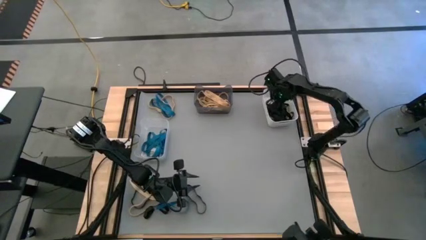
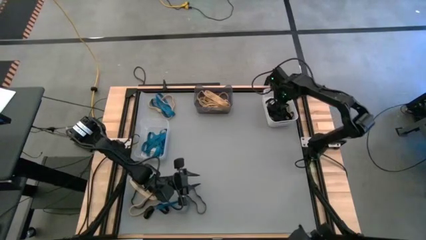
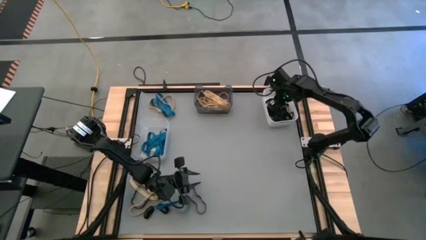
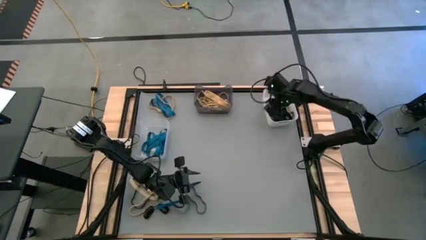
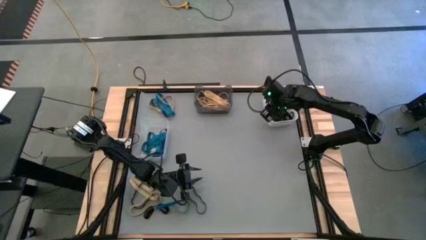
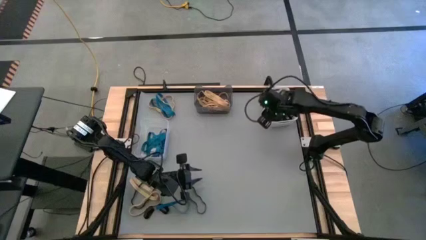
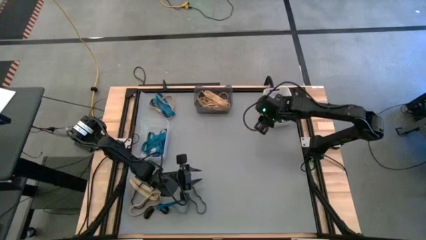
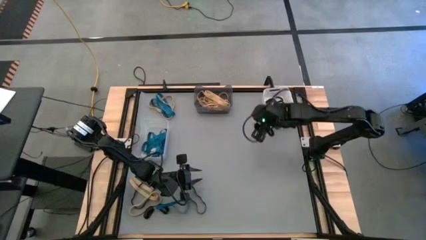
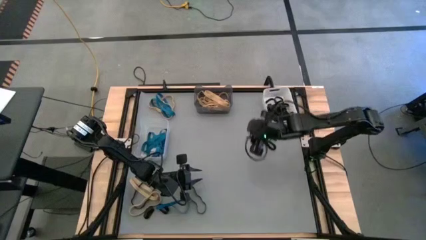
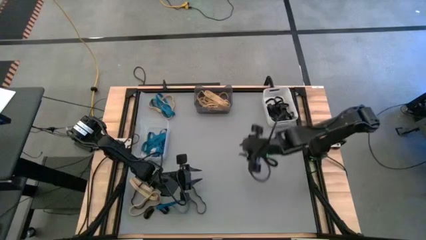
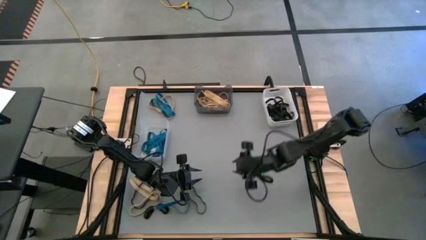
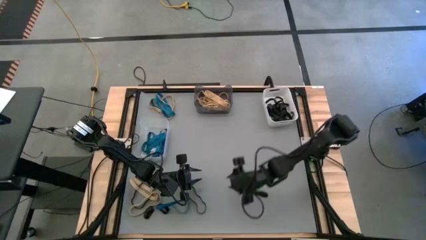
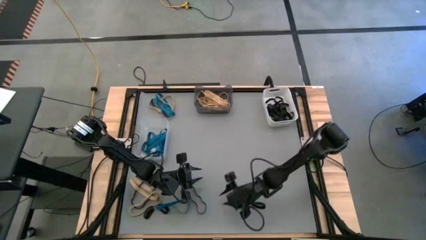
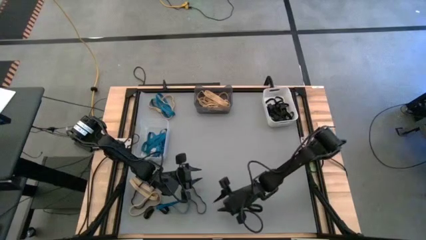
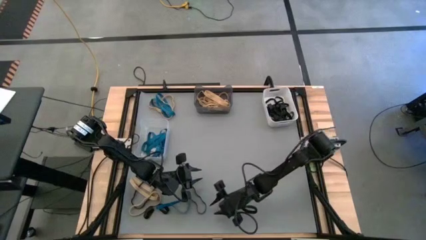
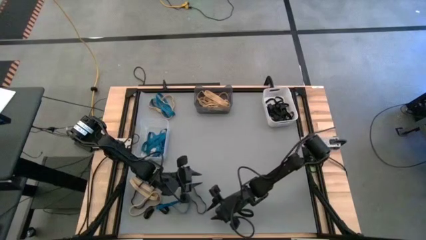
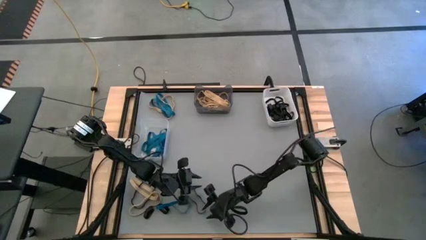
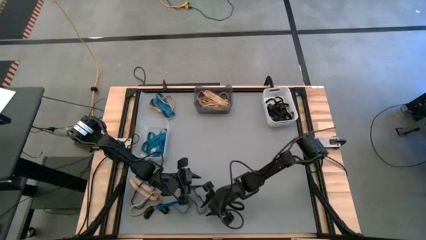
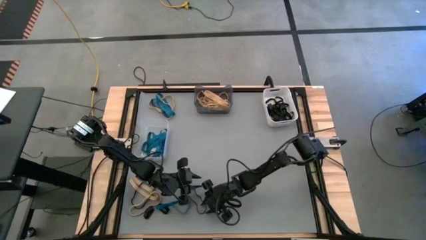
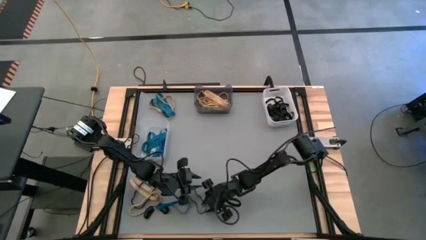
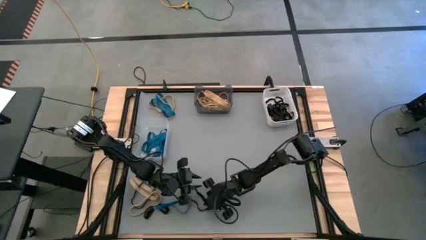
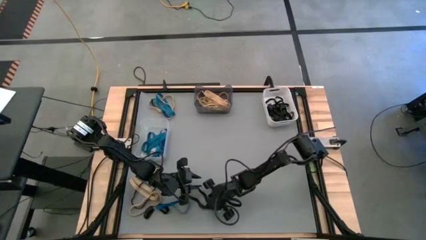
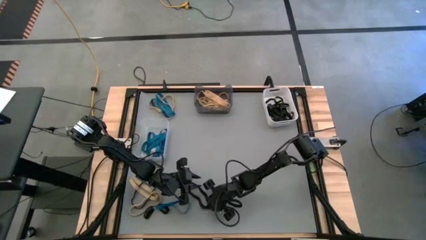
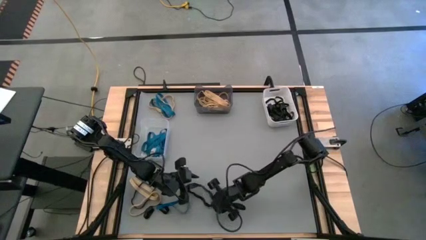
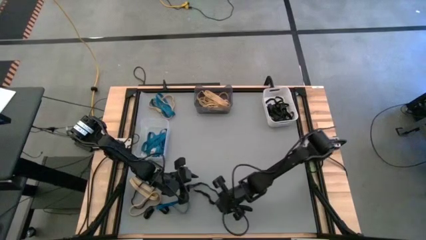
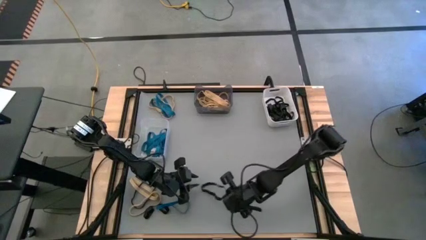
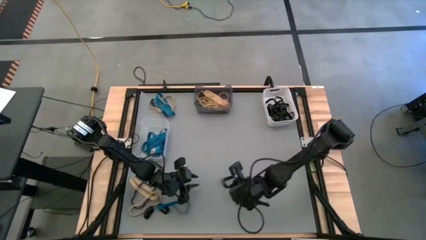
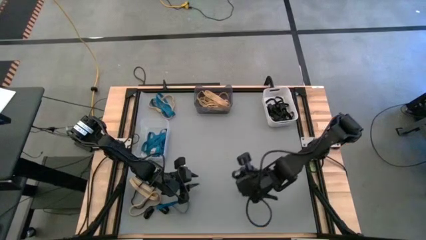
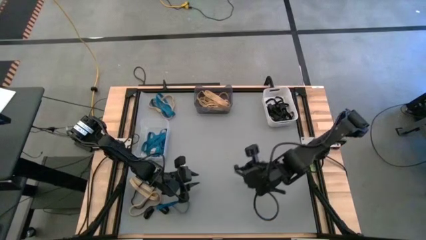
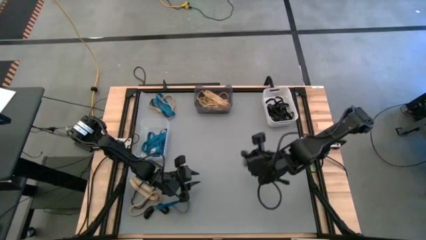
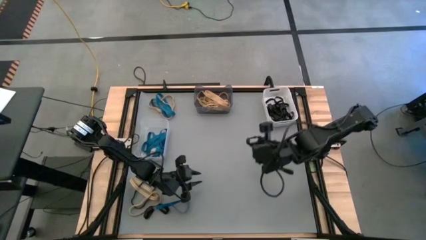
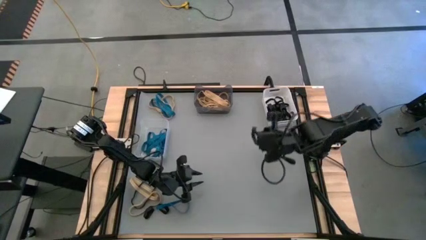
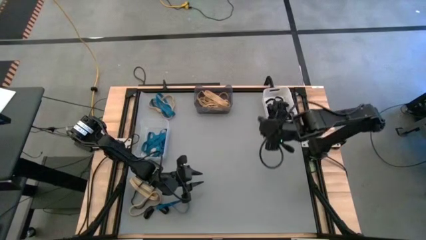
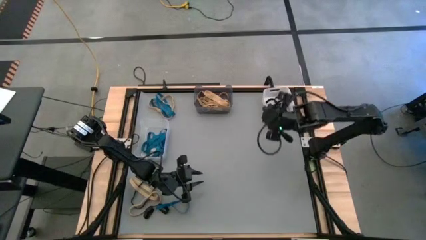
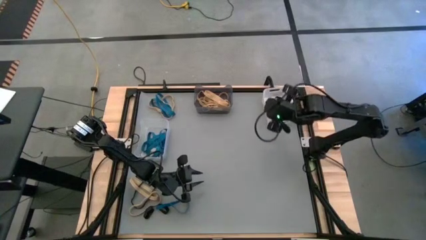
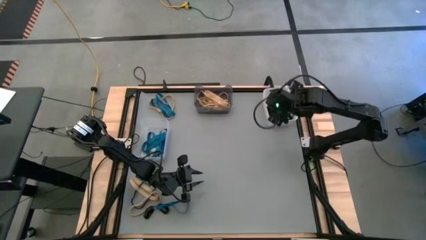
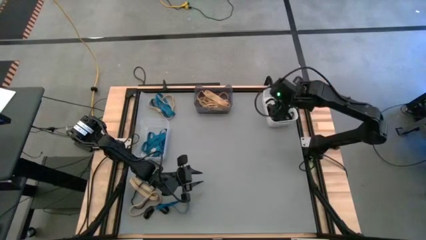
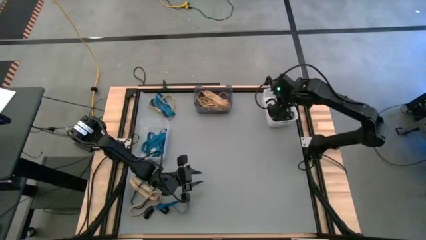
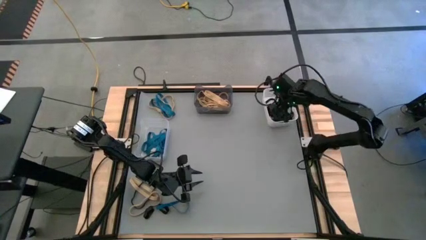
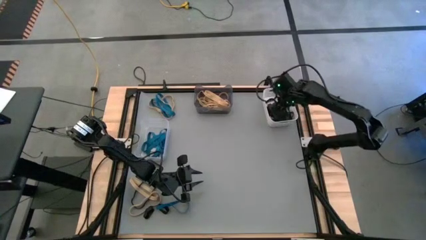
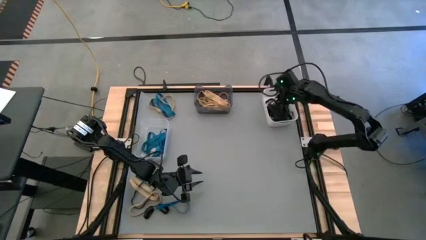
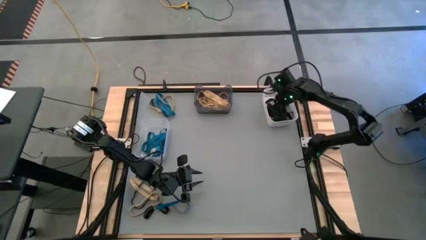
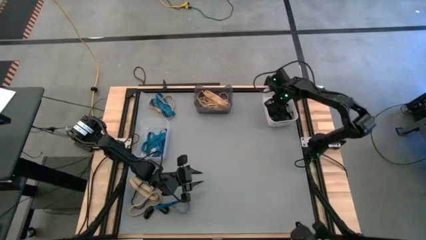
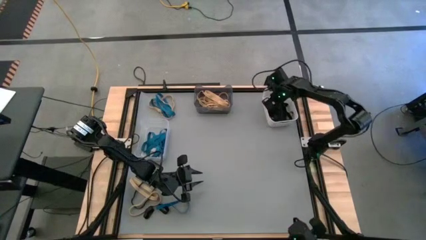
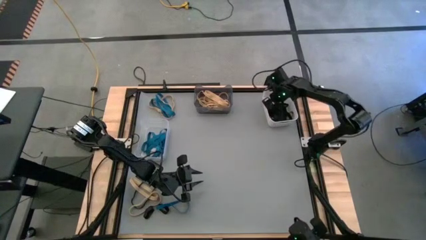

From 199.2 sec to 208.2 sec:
Task: Sort rubber bands into baskets
Put the black rubber band into the white bin

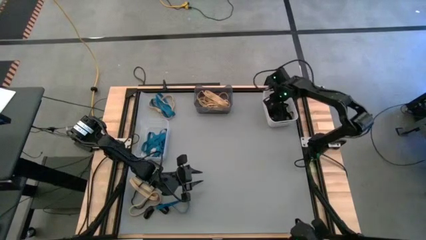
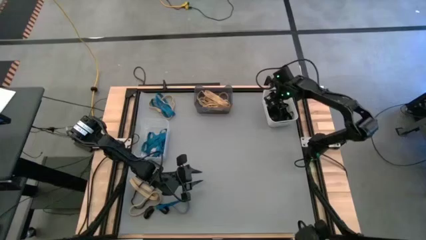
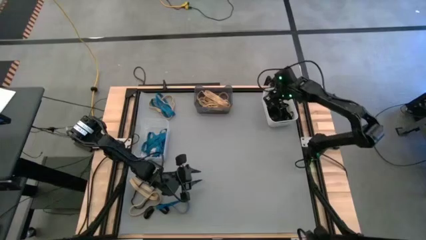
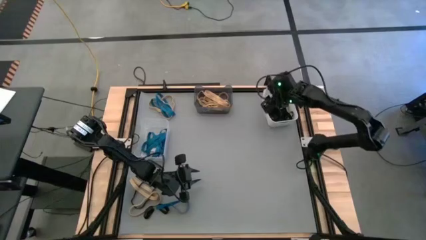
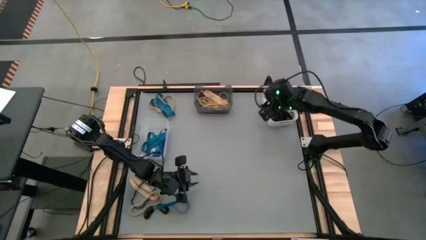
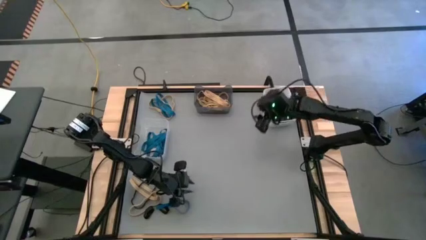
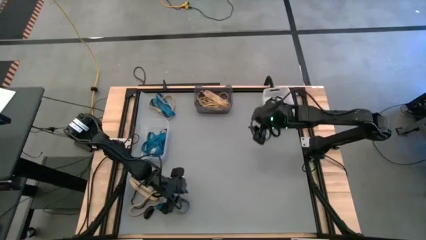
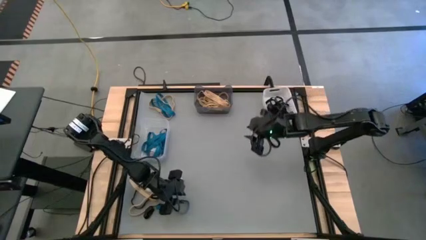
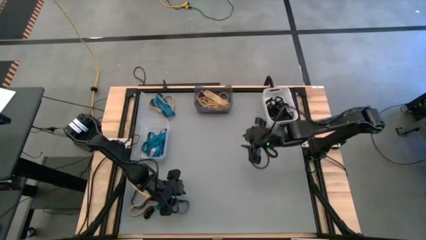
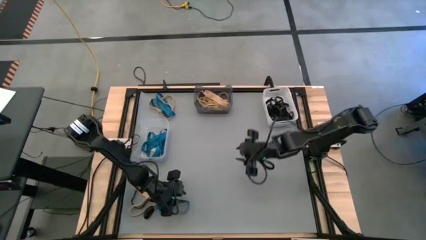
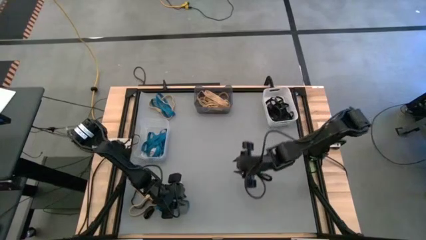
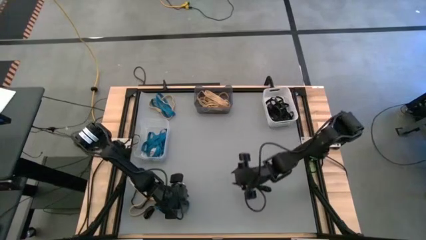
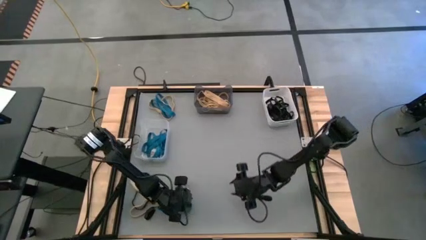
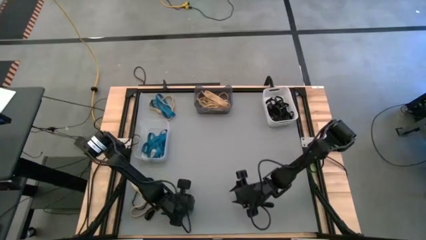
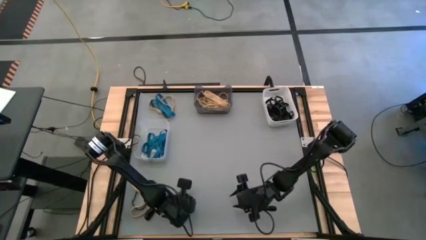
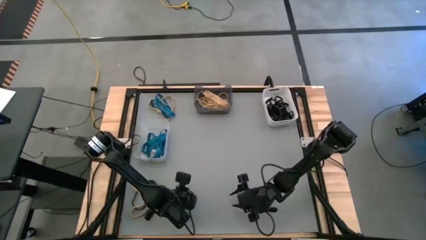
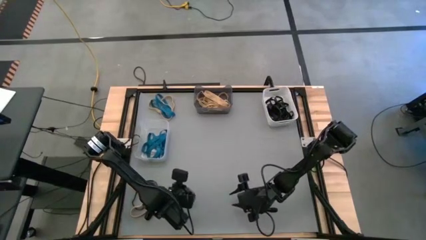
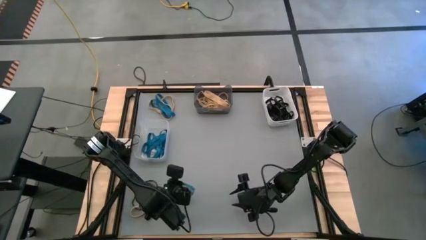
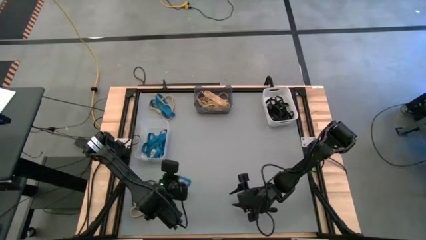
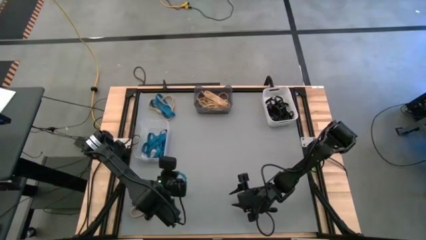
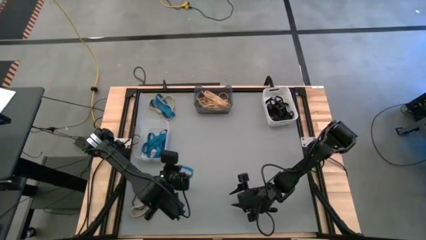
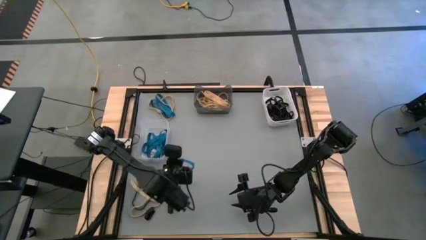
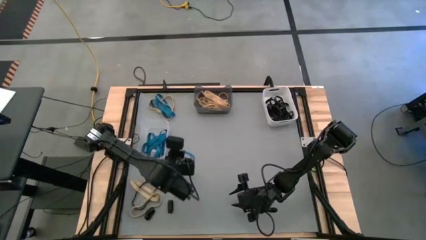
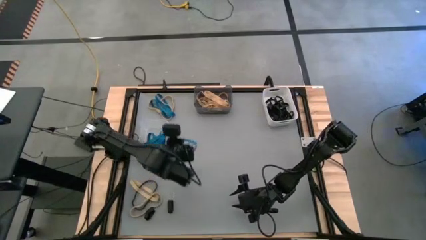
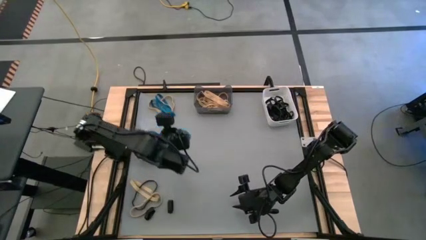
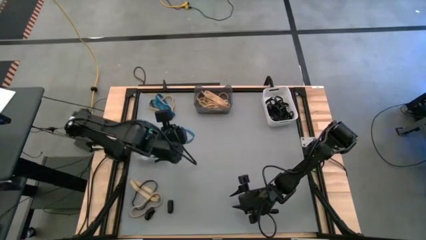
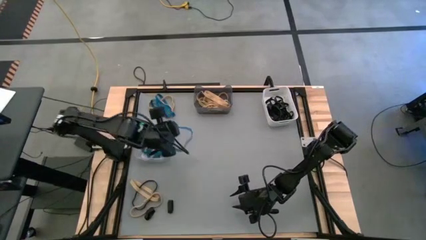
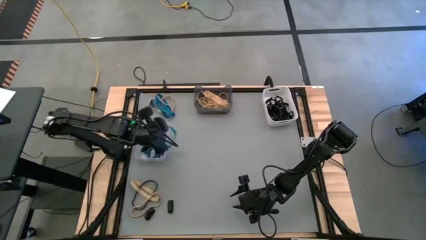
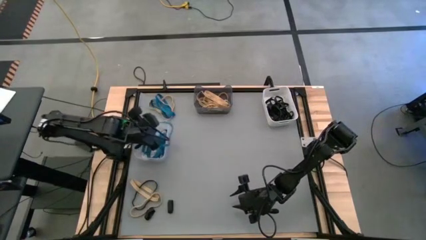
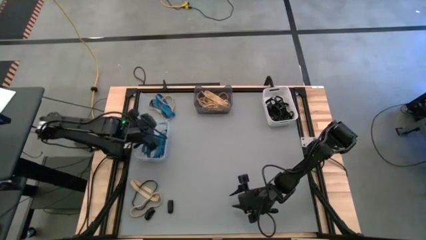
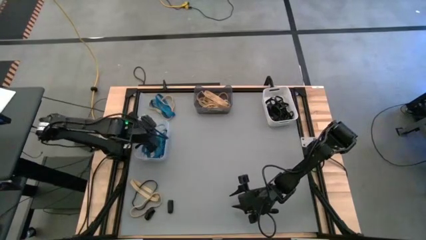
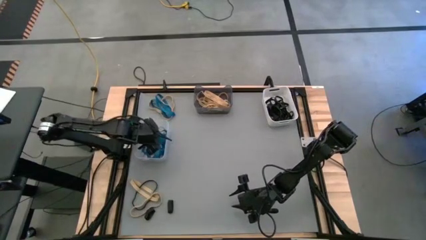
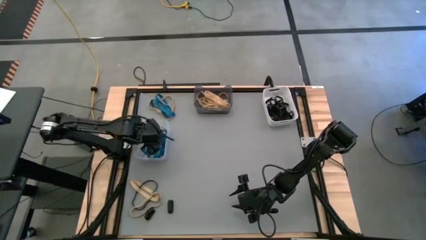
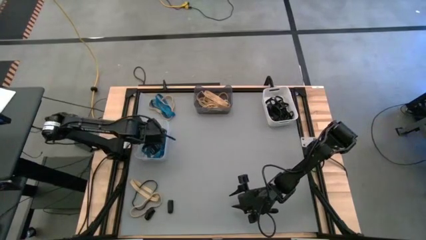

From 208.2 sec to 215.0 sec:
Put the blue rubber band into the transparent bin

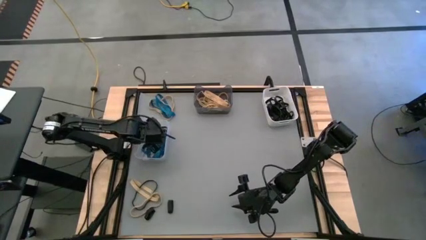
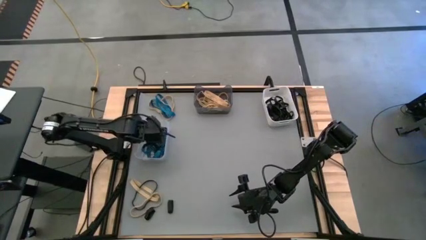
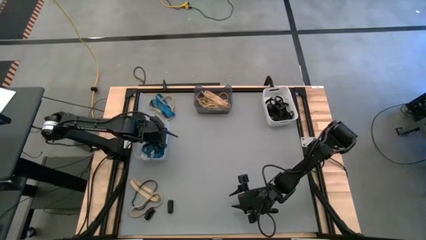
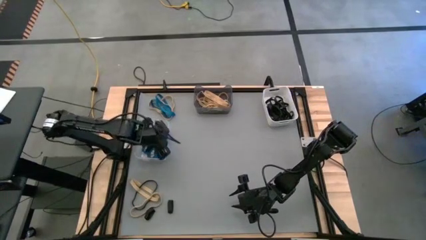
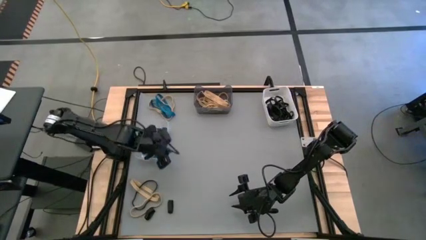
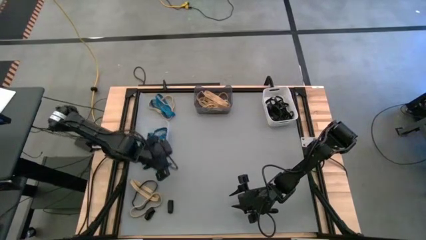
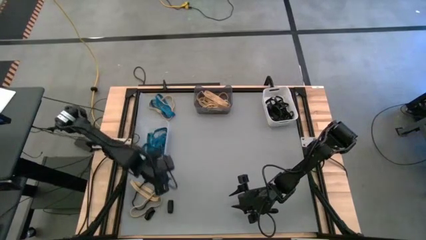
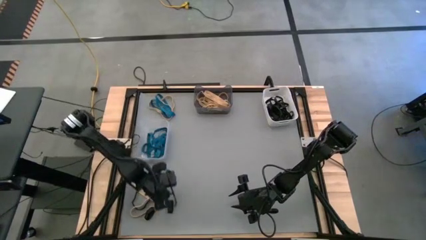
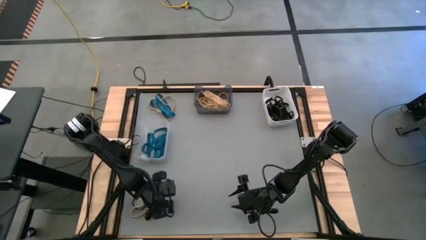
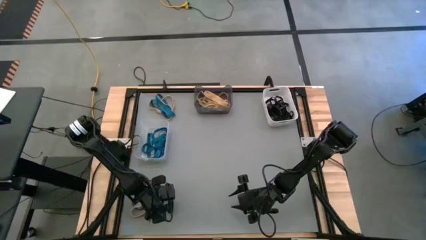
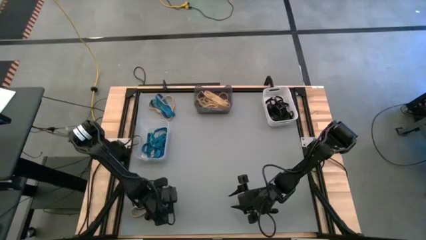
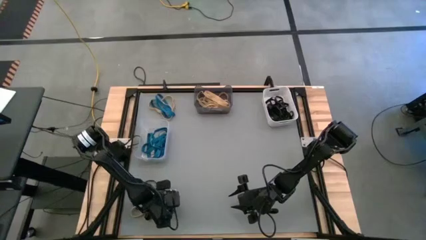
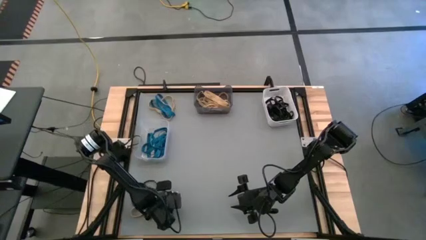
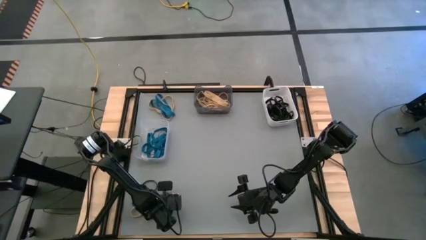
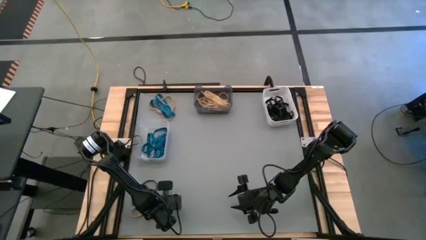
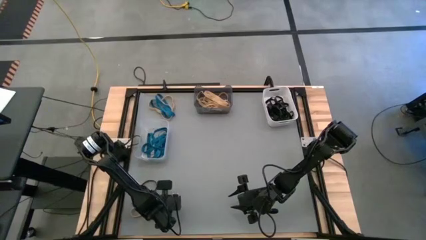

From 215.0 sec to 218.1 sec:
Put the black rubber band into the white bin
